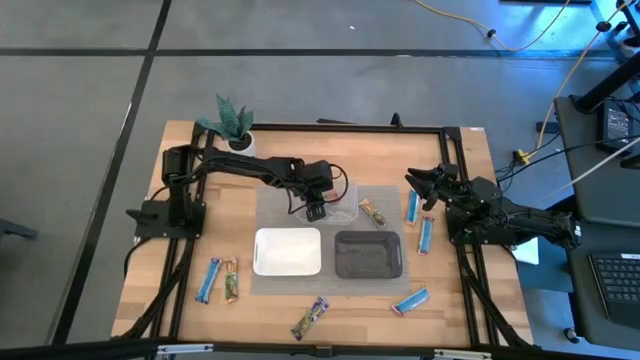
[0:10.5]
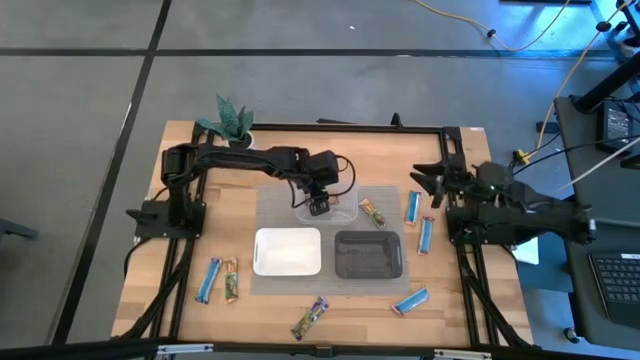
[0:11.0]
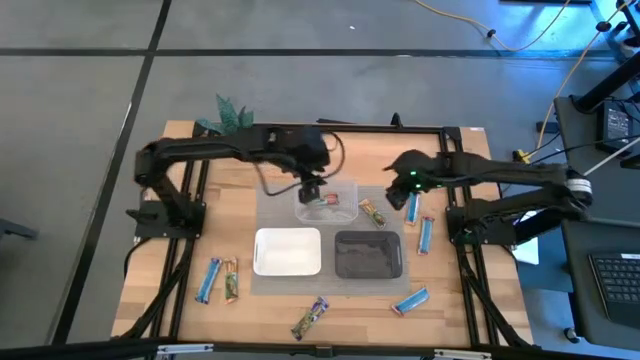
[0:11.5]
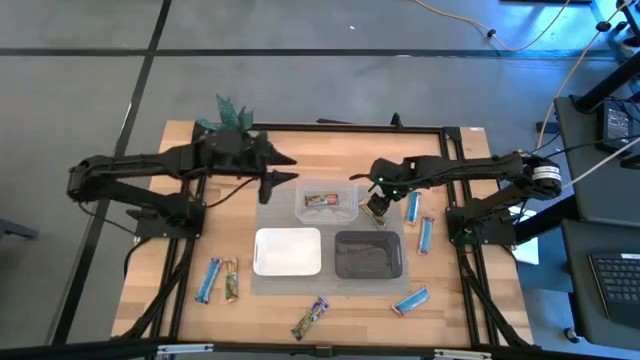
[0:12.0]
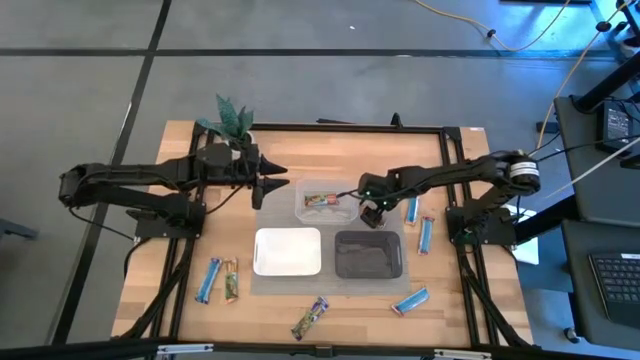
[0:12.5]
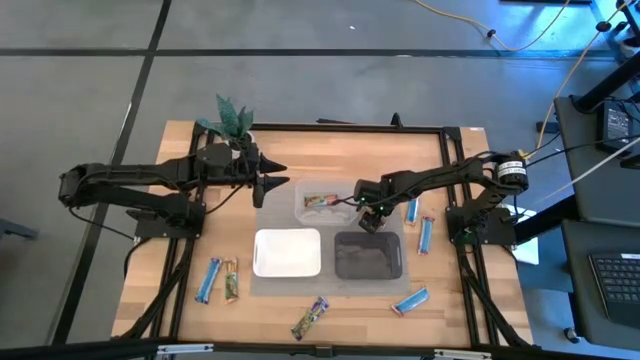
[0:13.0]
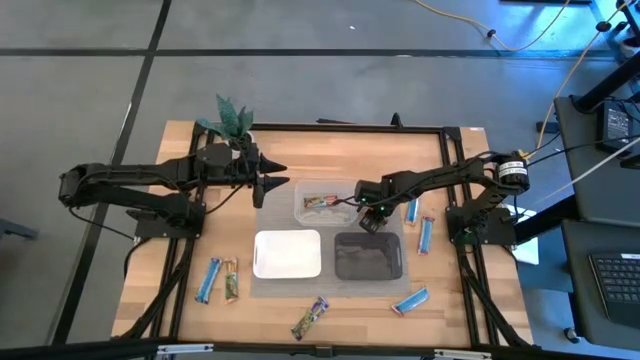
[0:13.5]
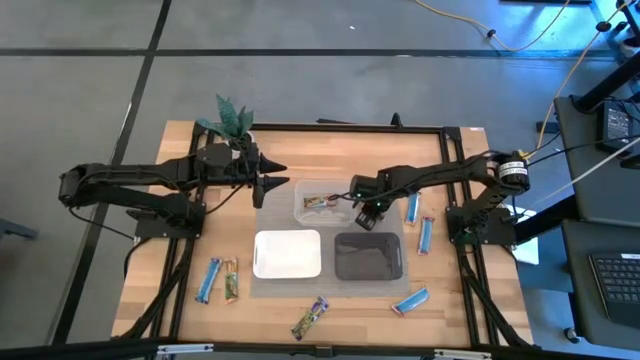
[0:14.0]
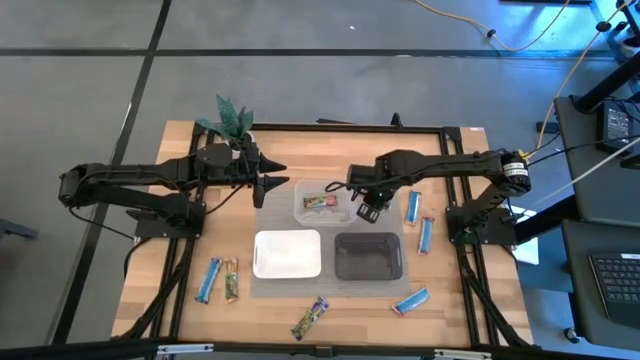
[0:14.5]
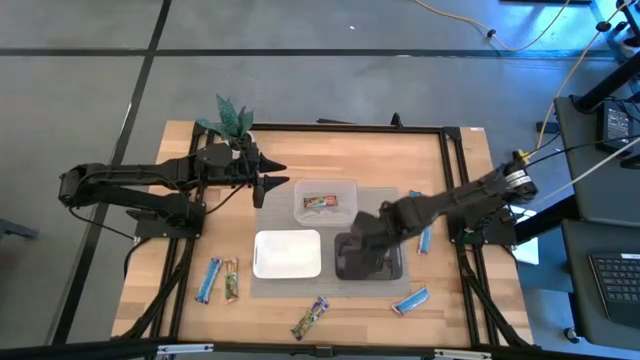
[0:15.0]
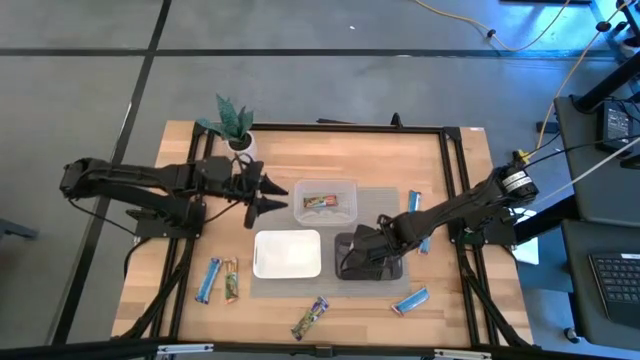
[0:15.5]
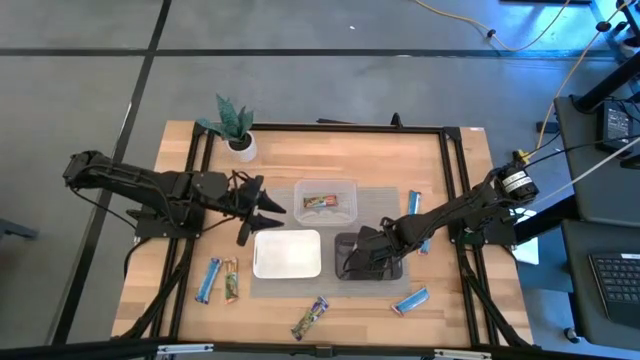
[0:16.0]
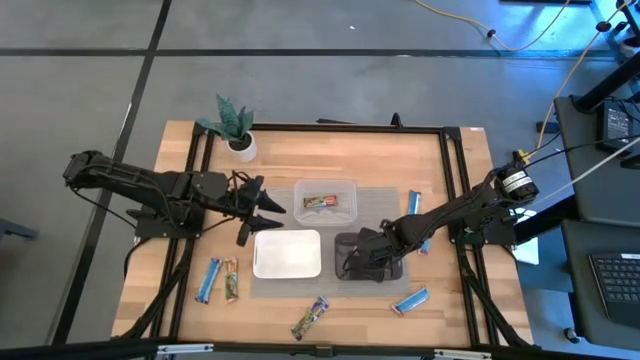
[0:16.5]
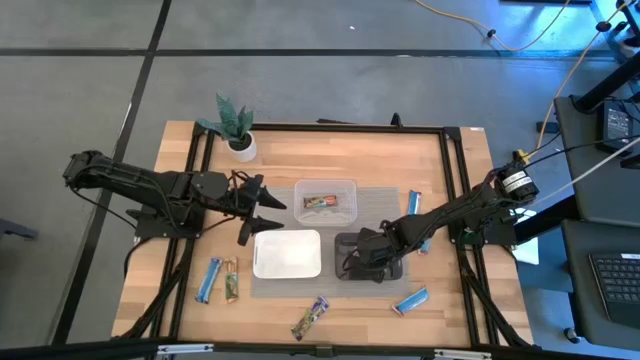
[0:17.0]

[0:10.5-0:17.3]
Task: Pick and place Granola Bars by type
Put the top left yellow granola bar into the transparent black bin

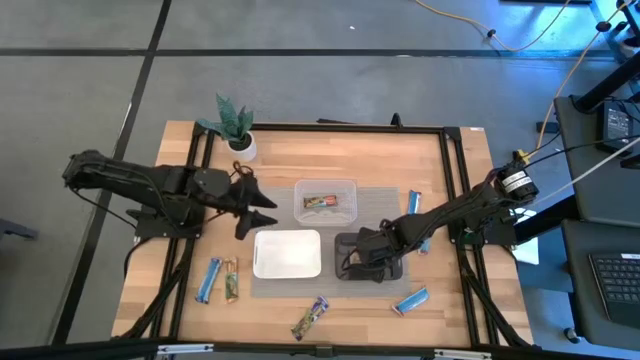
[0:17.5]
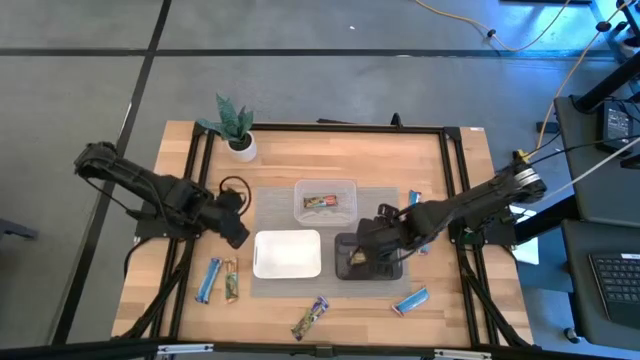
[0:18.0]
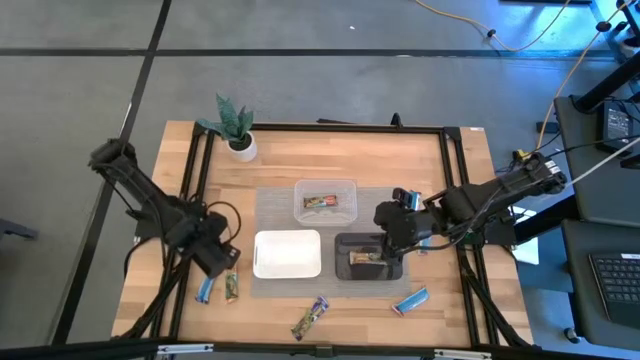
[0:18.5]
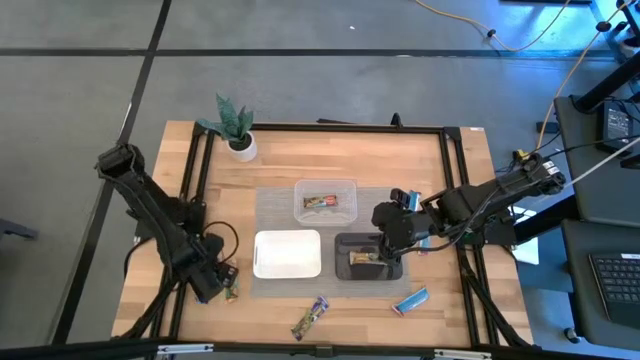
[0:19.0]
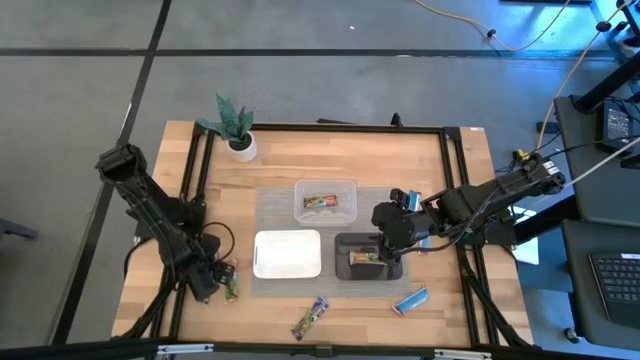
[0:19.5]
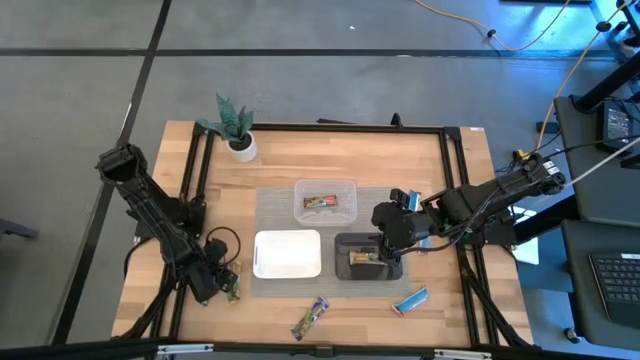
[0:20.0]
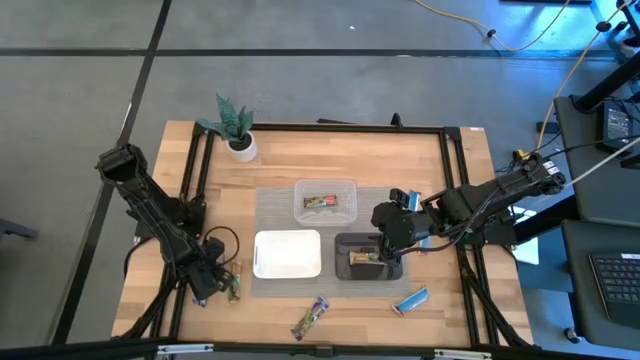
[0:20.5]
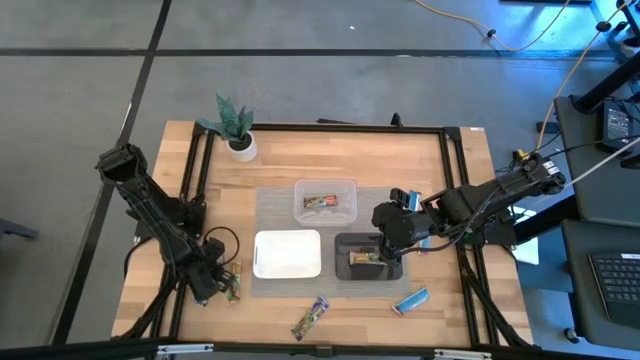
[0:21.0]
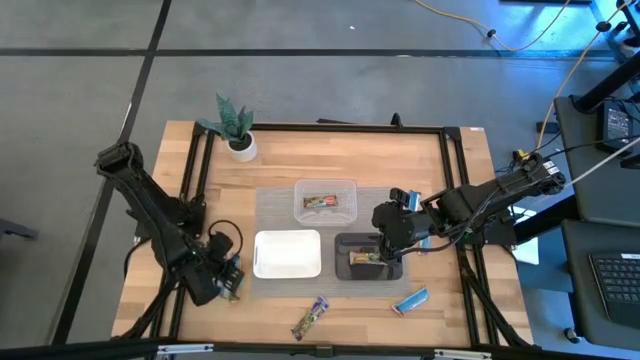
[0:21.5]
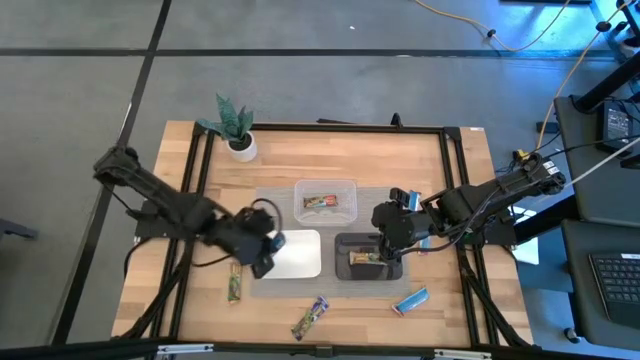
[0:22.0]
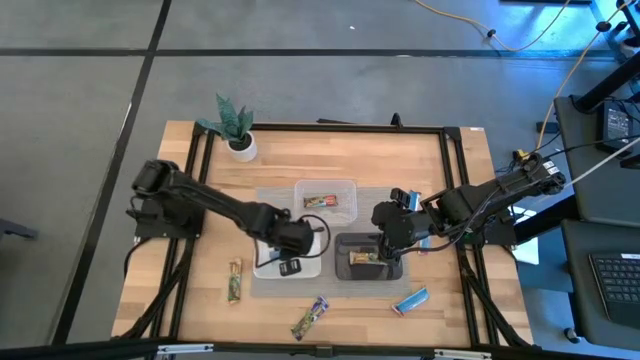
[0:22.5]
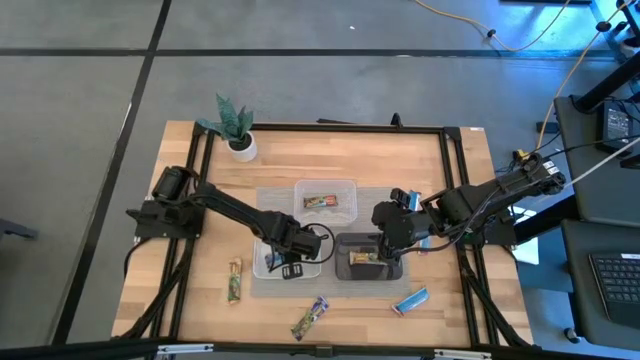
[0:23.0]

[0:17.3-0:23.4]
Put the left blue granola bar into the white bin

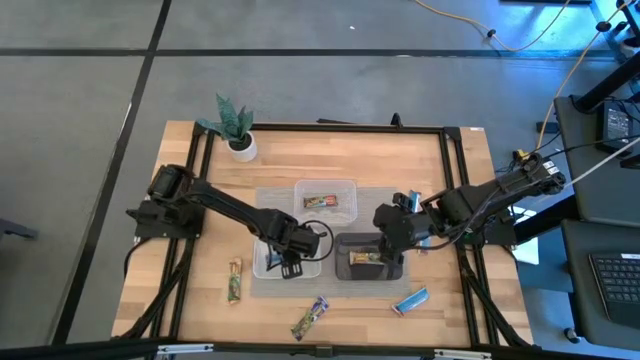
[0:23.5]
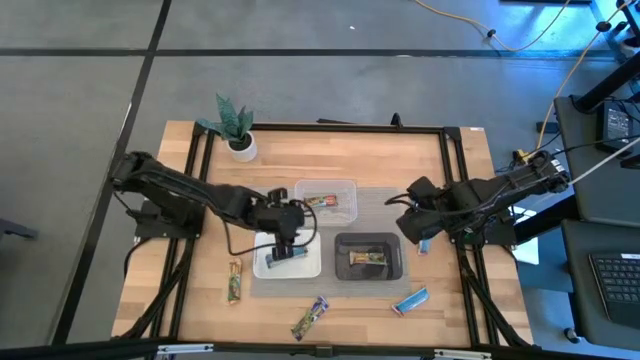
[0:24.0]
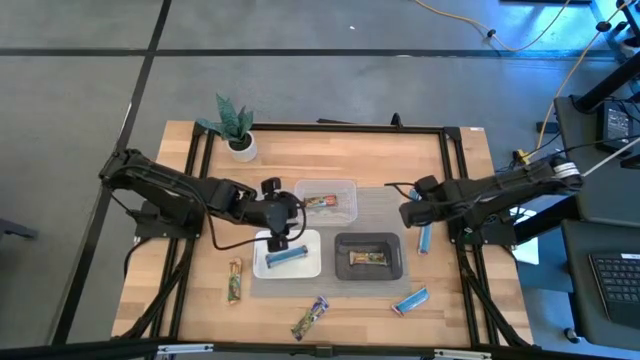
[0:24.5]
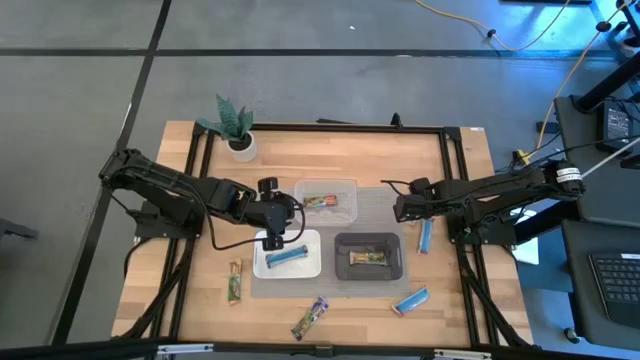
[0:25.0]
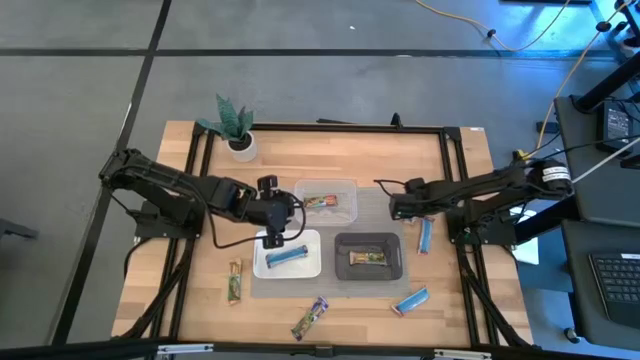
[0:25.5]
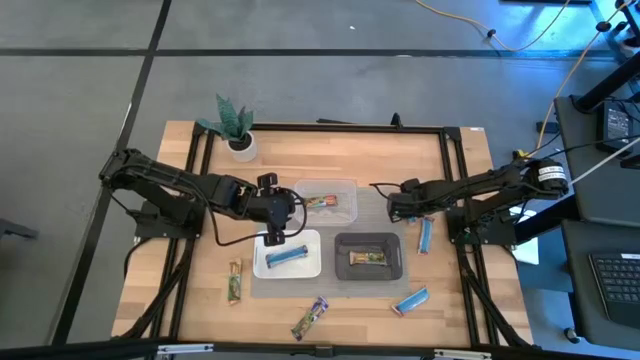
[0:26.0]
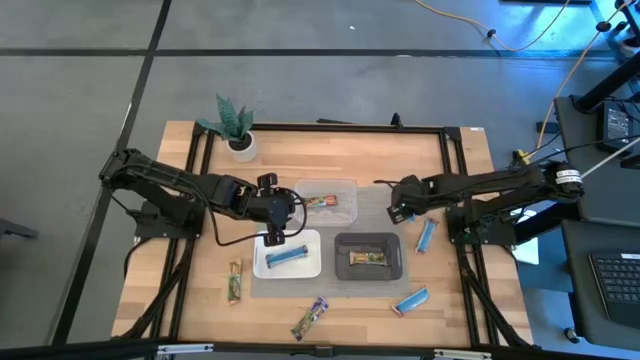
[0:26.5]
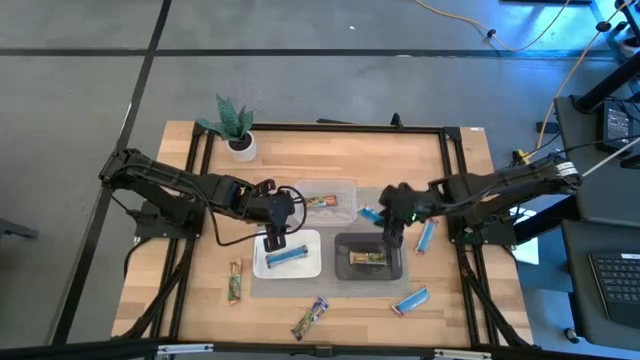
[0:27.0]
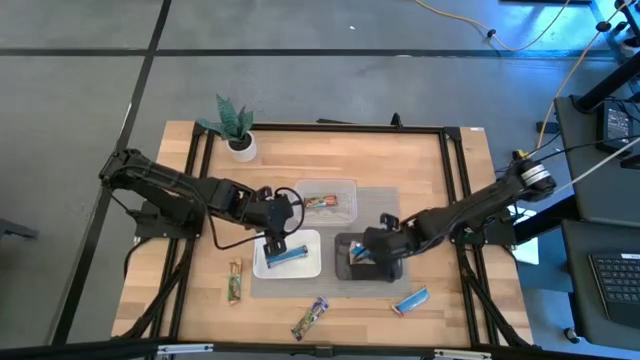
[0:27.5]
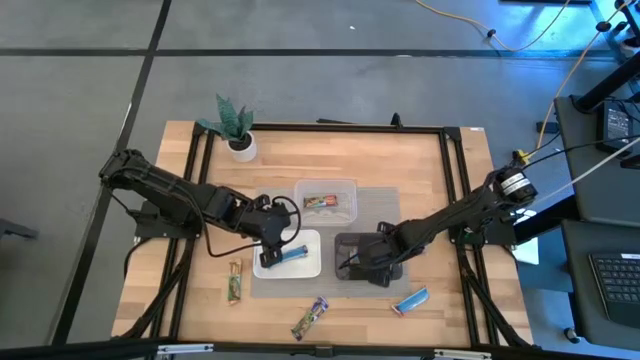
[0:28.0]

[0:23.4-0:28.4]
Put the right yellow granola bar into the transparent black bin

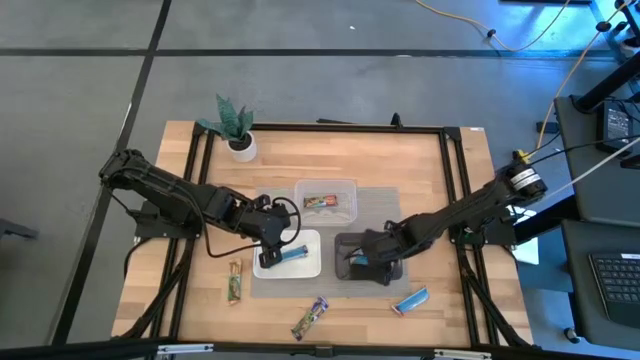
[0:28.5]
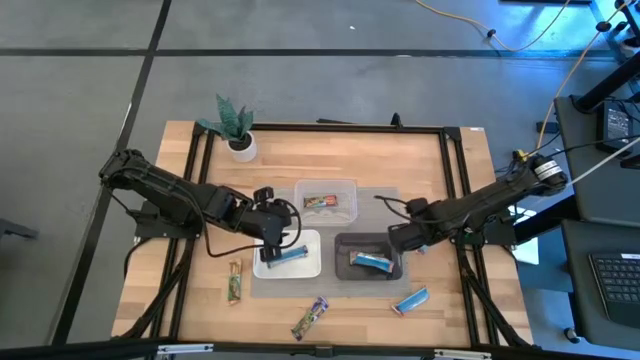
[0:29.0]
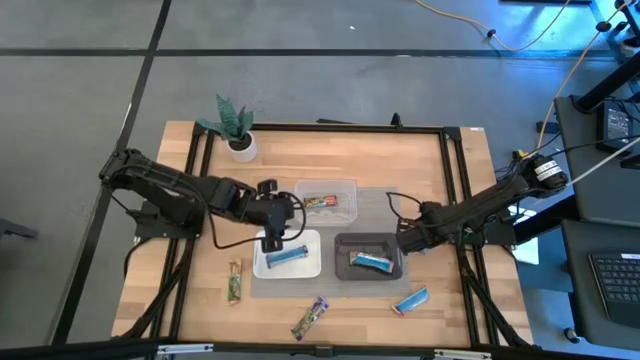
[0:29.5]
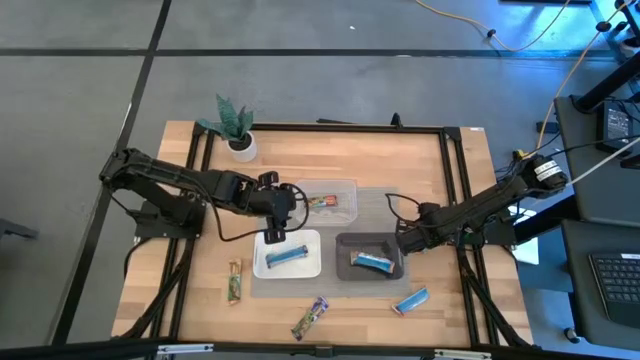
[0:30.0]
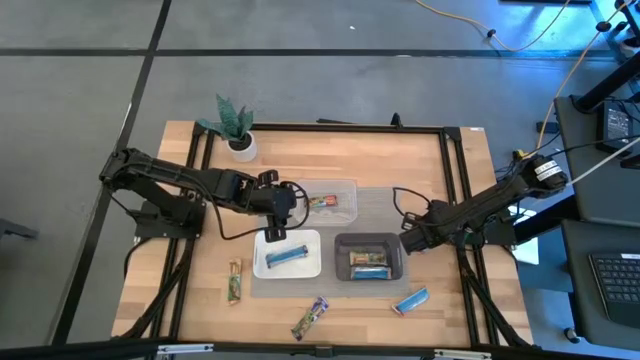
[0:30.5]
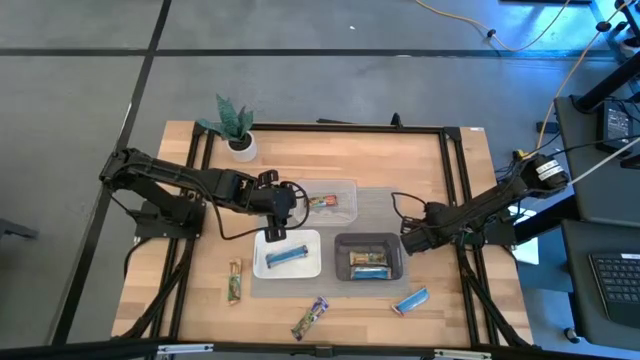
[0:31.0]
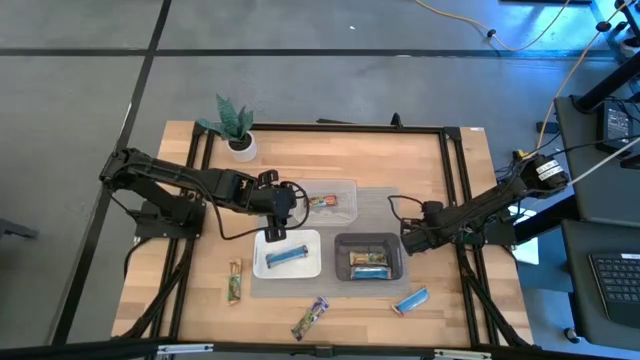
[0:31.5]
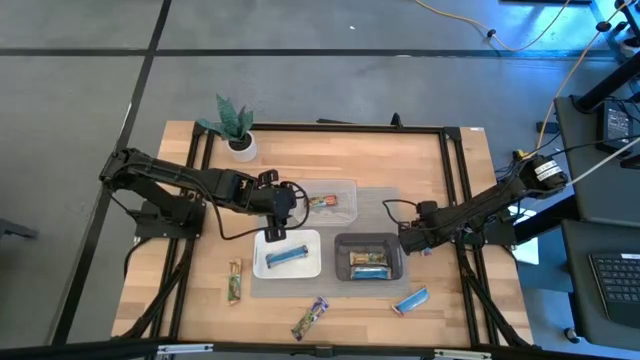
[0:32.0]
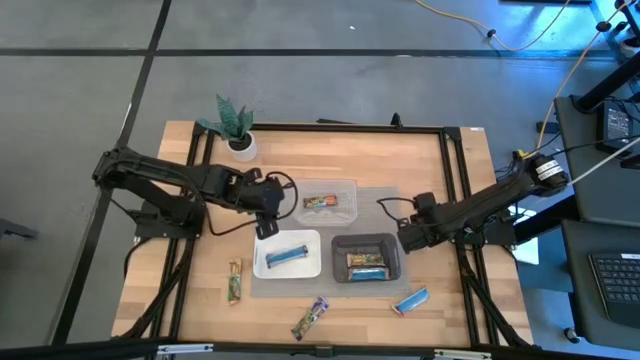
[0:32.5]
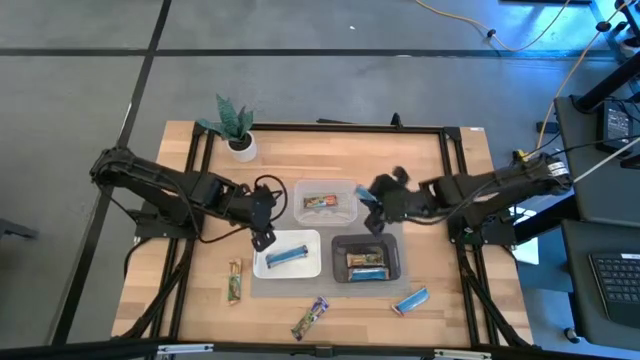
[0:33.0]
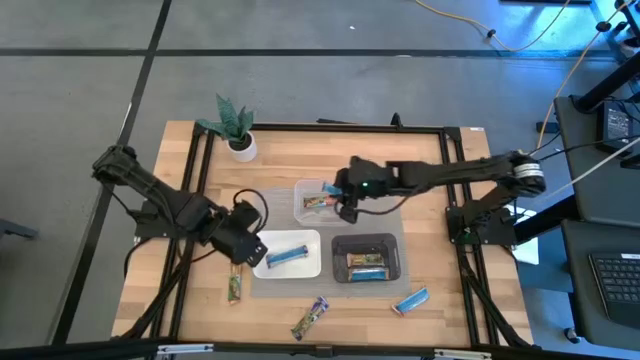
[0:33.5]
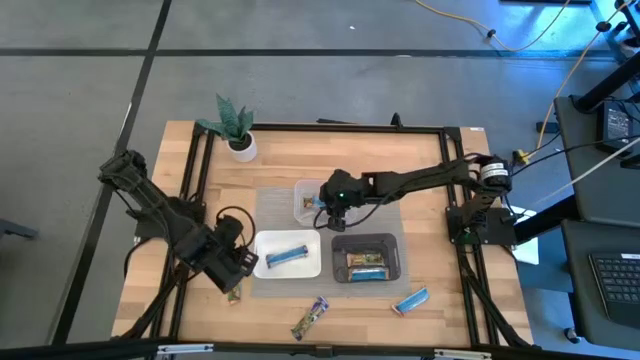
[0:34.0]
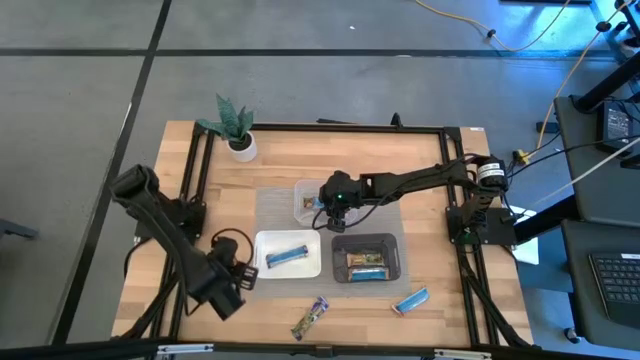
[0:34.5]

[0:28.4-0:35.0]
Put the top red granola bar into the transparent bin
